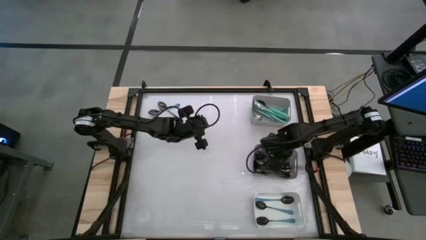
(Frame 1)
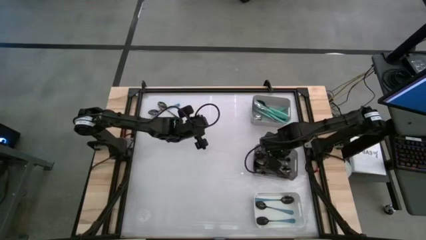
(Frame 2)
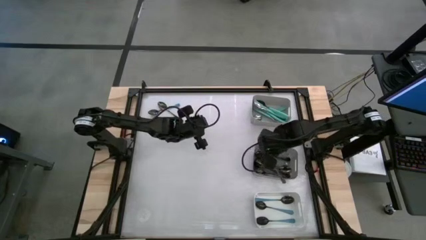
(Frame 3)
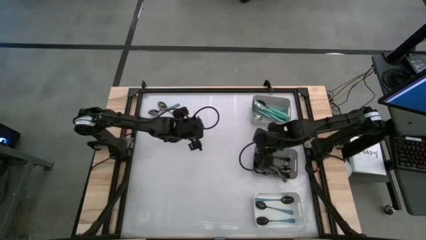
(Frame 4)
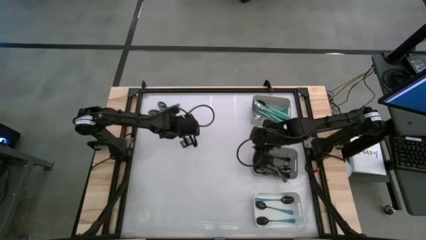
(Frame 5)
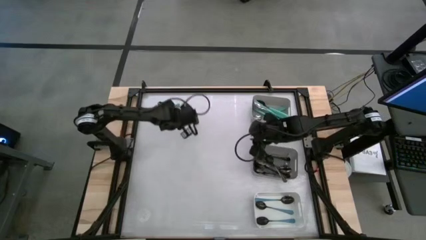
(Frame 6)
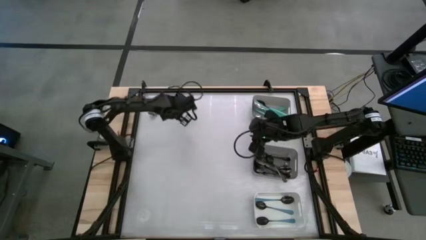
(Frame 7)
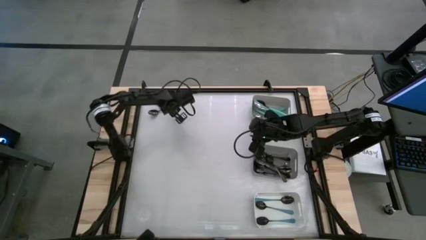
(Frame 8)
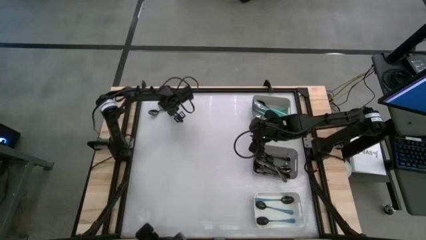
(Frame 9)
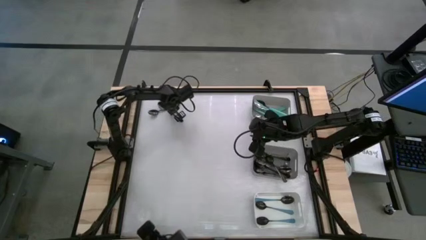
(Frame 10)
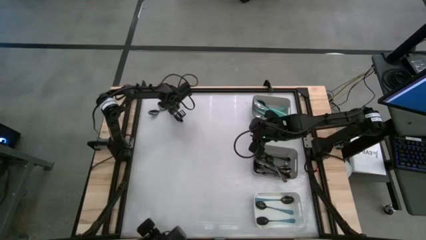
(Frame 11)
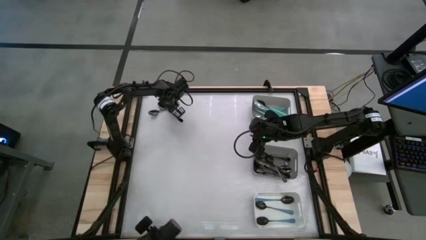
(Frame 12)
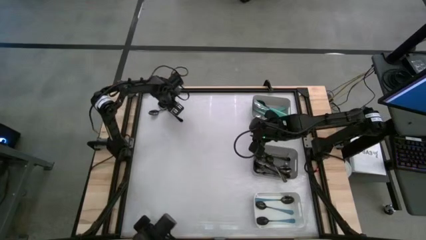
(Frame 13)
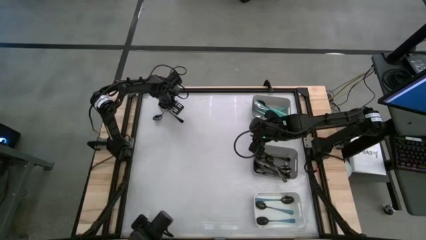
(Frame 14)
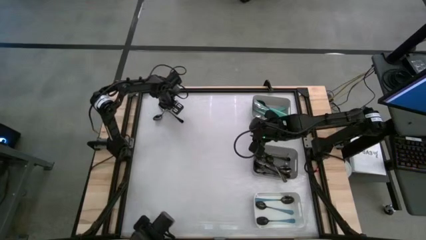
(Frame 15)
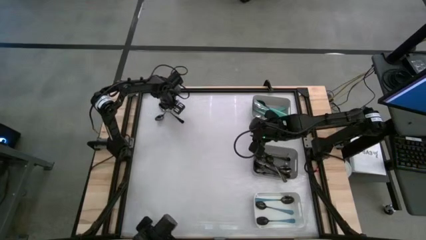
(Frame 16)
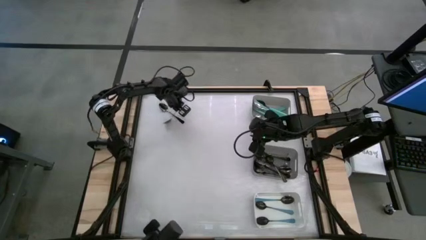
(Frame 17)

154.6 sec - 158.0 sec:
Task: Sort silverware by color (type)
Put the blue spoon into the white bin

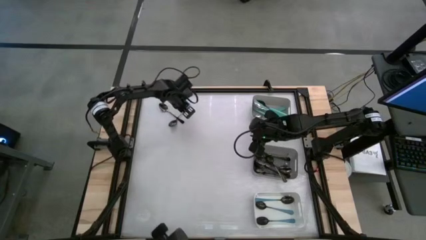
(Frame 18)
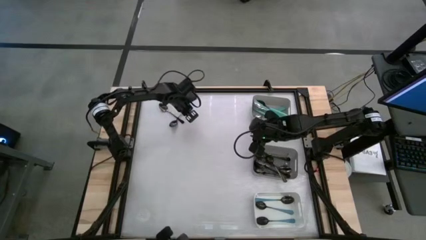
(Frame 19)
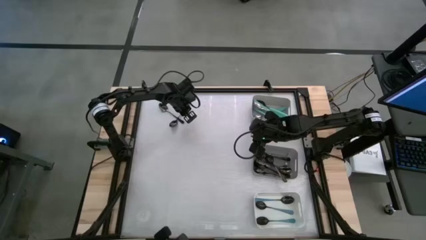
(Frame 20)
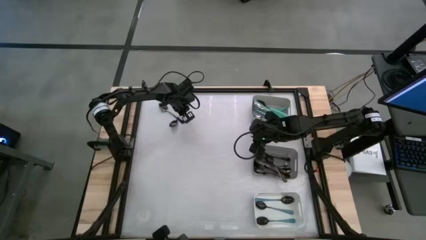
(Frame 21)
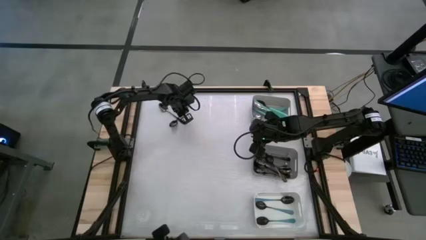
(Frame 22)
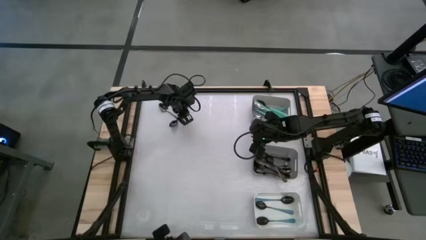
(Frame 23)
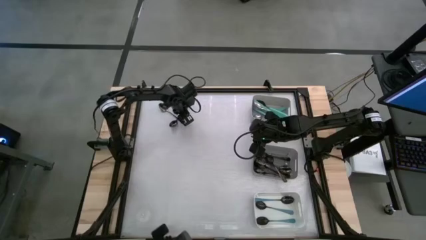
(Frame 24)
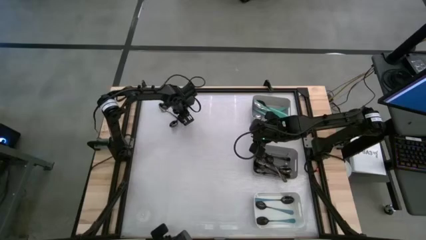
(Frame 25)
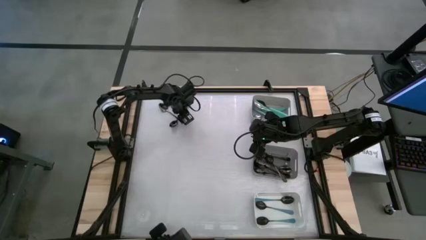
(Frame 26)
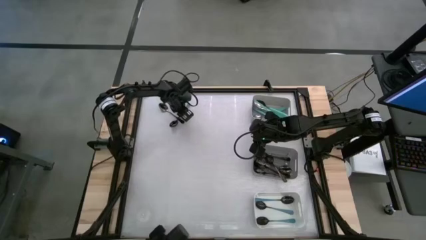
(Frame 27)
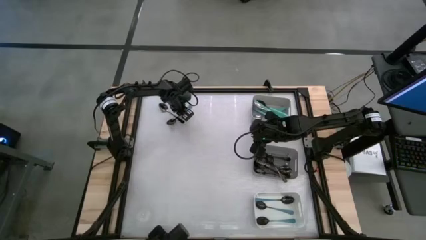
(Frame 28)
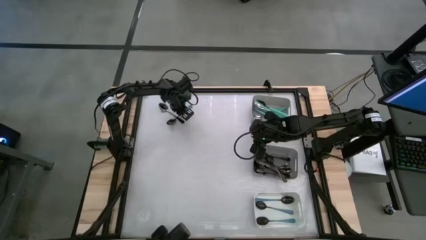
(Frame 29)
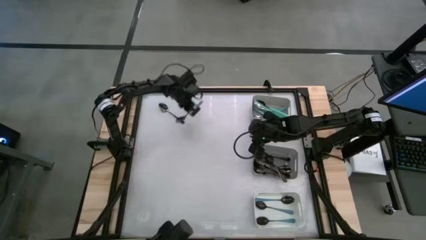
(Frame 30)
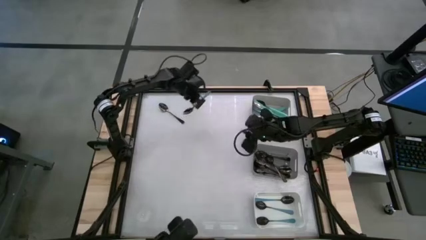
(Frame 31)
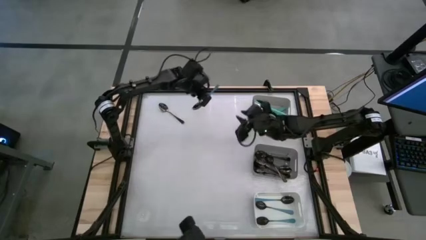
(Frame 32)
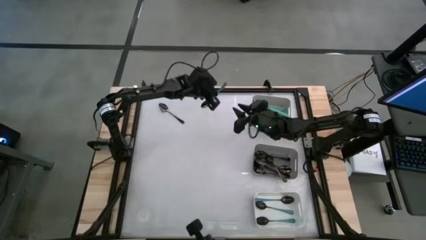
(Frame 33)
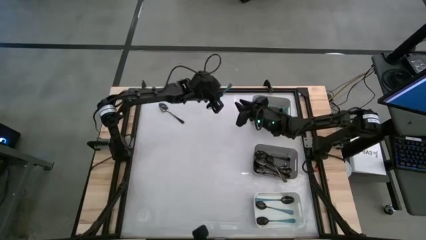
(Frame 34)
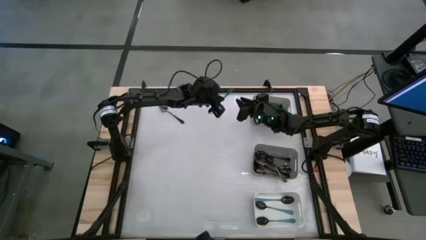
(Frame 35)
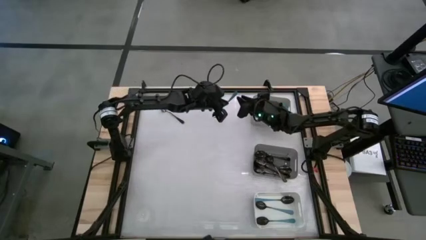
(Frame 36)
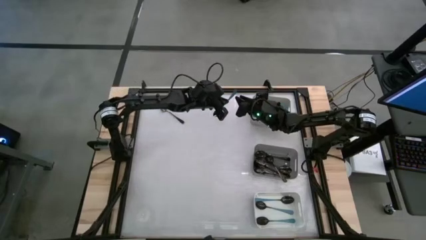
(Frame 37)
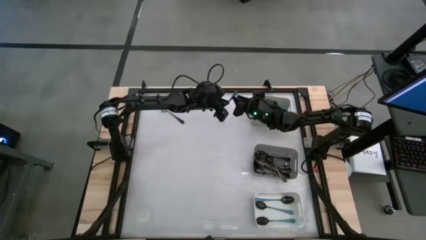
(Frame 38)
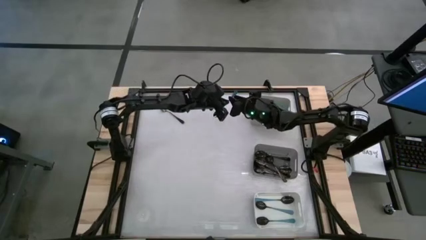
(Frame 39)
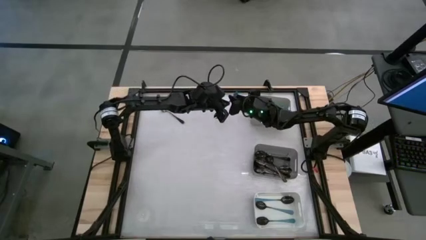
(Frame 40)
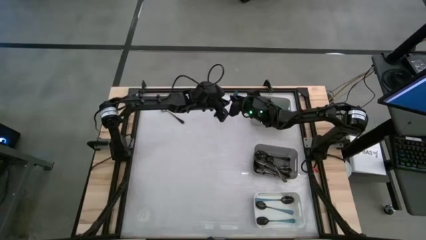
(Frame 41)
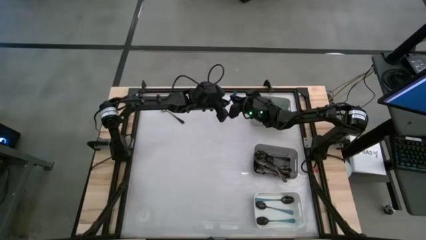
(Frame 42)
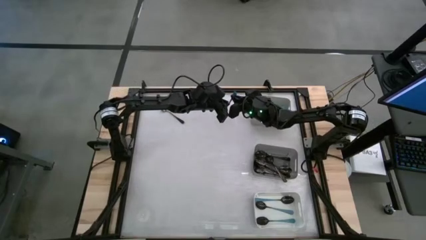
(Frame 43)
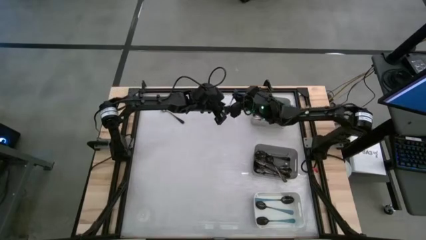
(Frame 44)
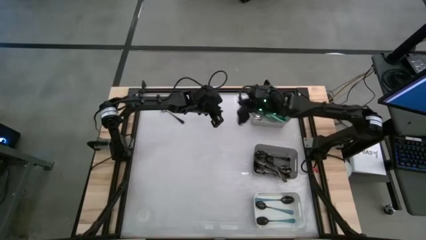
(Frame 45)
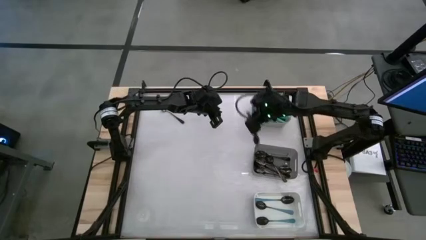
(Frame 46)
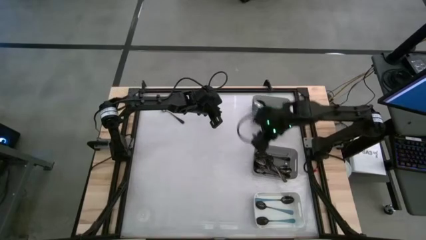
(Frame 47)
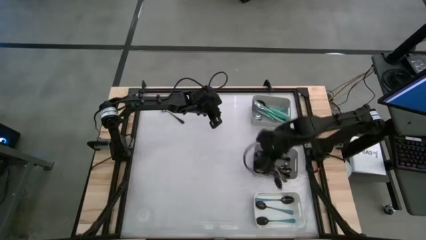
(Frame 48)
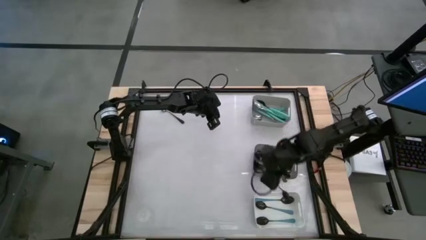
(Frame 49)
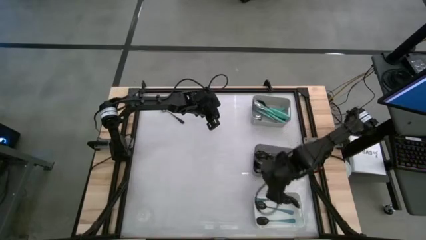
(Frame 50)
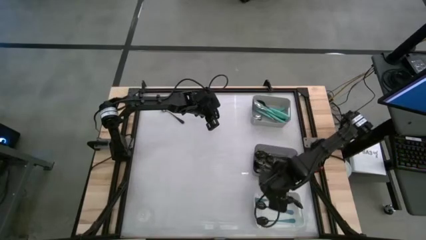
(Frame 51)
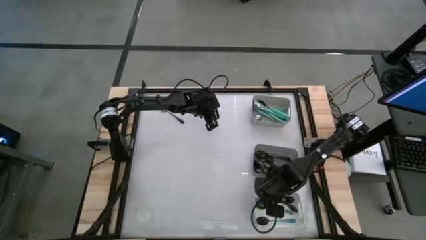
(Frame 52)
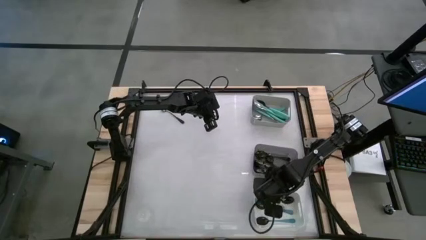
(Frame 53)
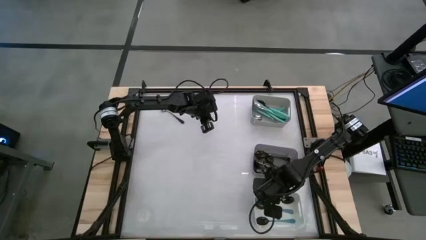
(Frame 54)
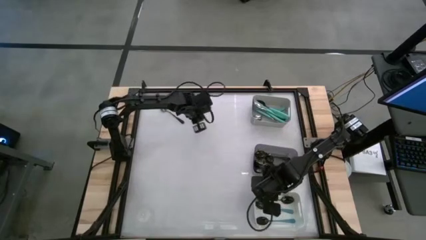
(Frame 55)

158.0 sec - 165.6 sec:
Put the blue spoon into the white bin

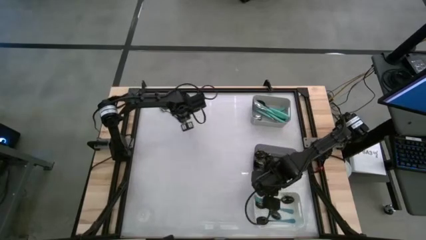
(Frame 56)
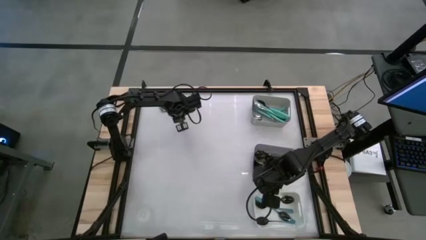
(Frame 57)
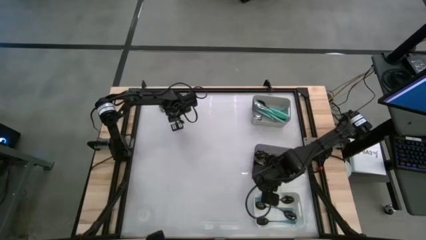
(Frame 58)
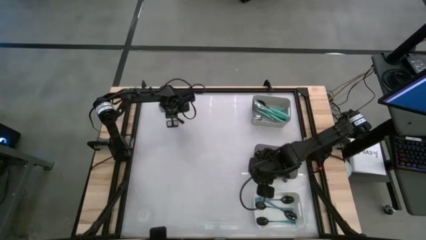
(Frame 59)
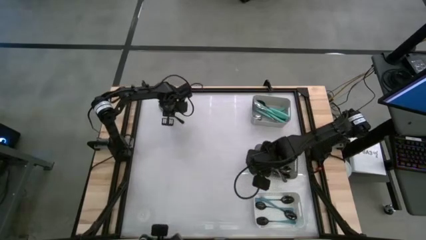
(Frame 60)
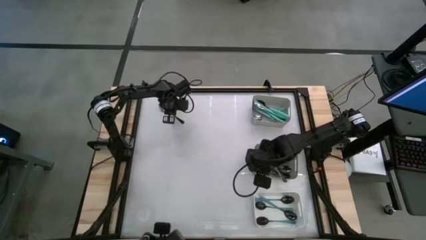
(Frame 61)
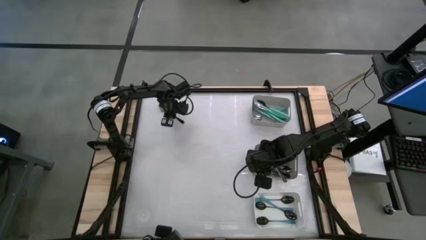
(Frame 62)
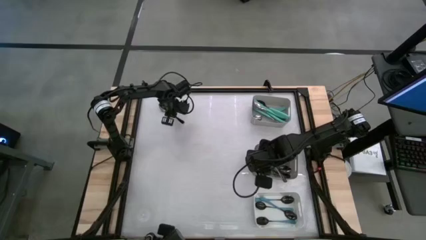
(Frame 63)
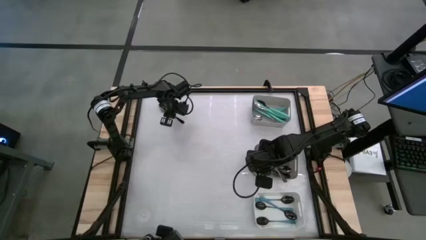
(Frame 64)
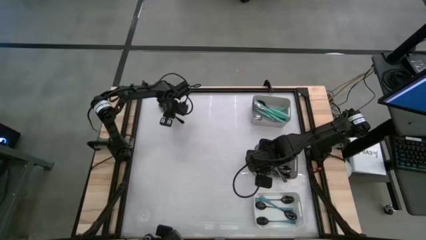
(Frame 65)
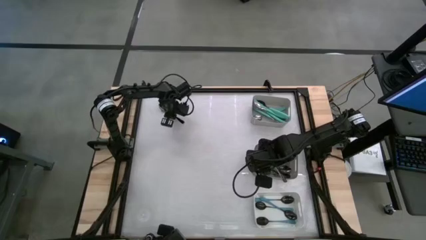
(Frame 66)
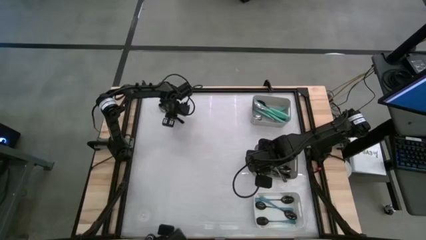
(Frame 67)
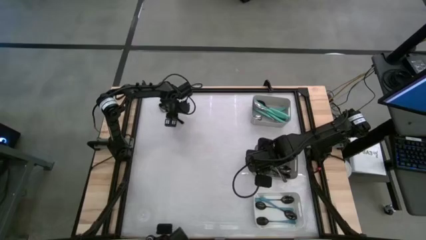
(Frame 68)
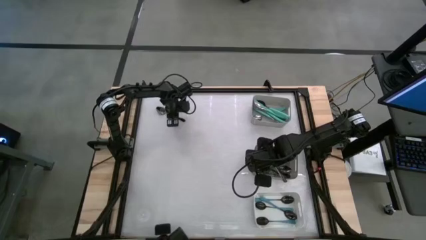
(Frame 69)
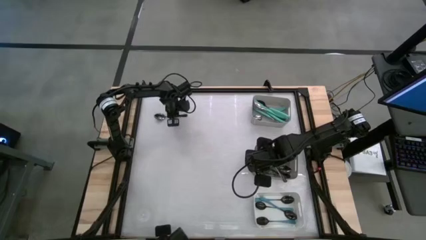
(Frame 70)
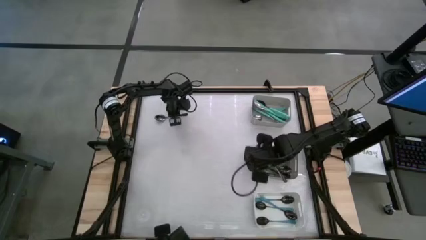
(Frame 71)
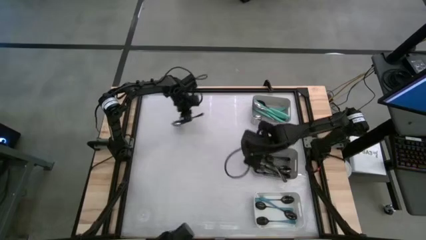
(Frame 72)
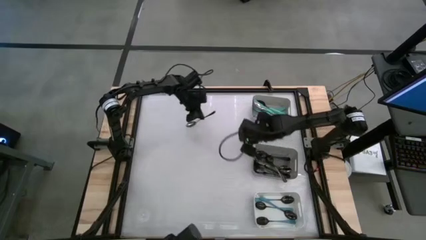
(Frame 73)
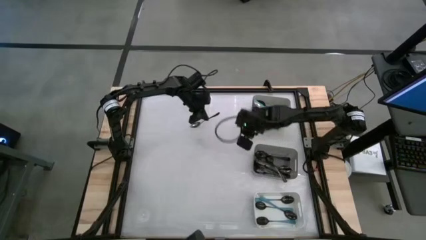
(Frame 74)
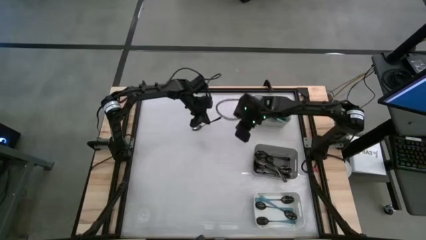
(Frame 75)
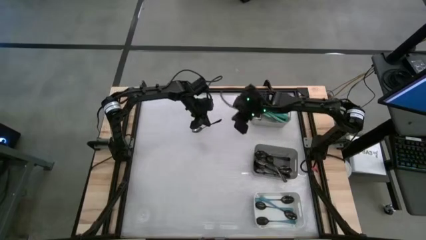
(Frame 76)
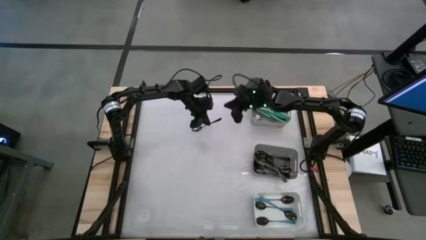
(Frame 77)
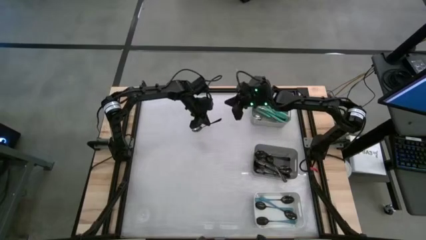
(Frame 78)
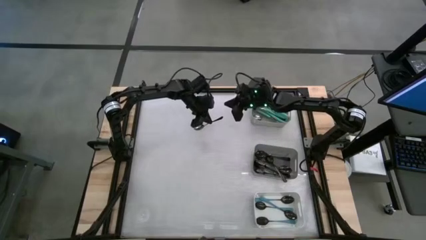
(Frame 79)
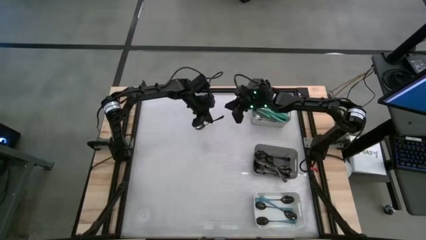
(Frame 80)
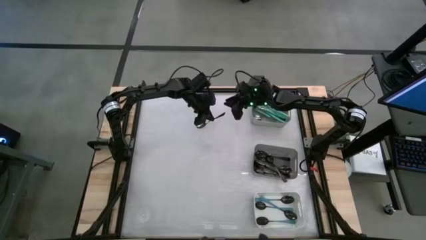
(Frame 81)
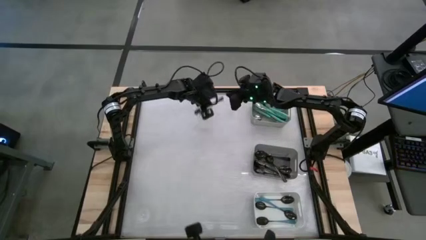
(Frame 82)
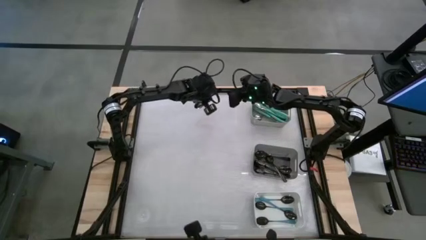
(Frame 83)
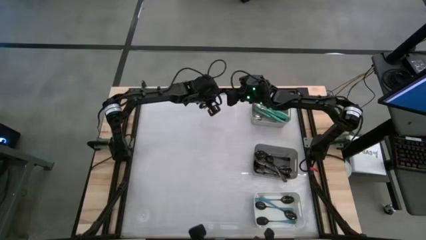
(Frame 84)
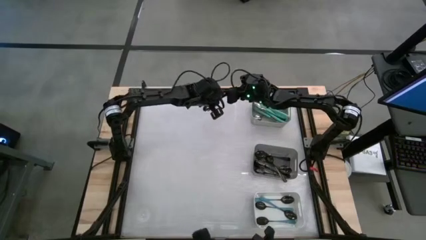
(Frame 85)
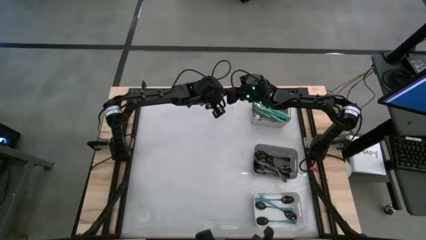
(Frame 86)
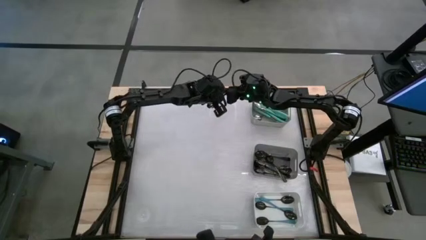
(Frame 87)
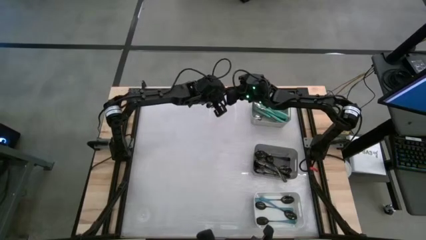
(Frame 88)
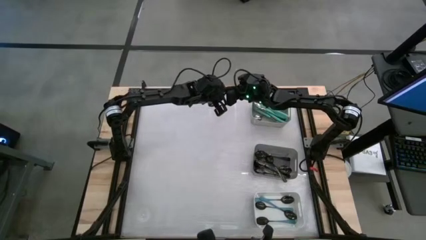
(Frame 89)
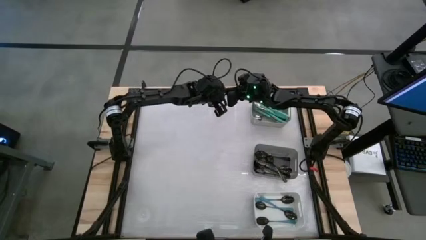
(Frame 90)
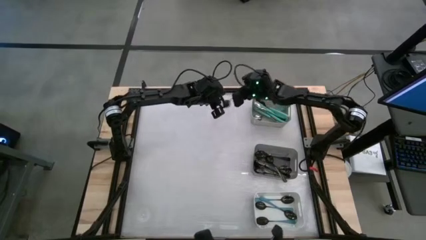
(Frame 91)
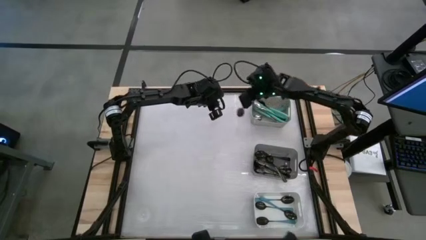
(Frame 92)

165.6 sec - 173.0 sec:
Put the black spoon into the black bin
